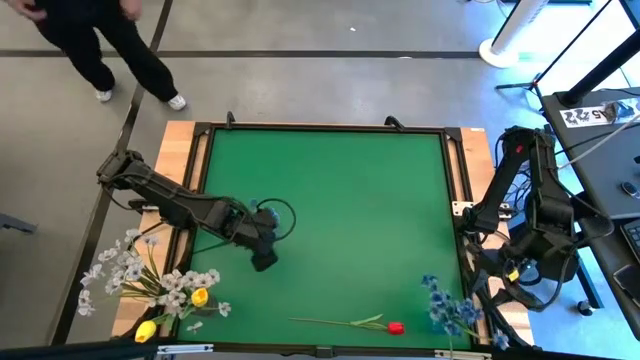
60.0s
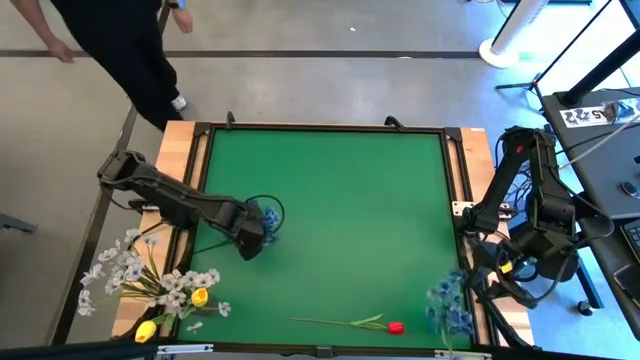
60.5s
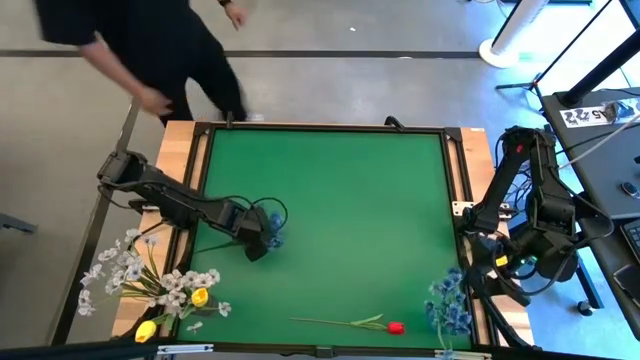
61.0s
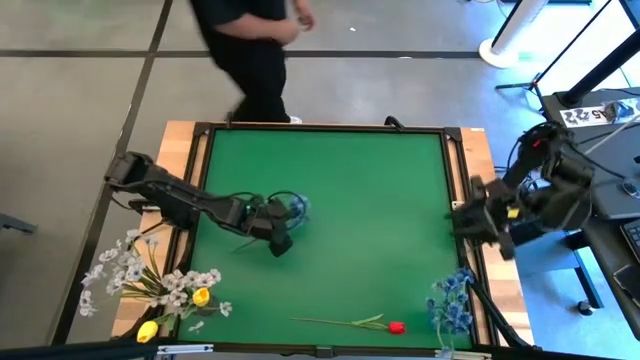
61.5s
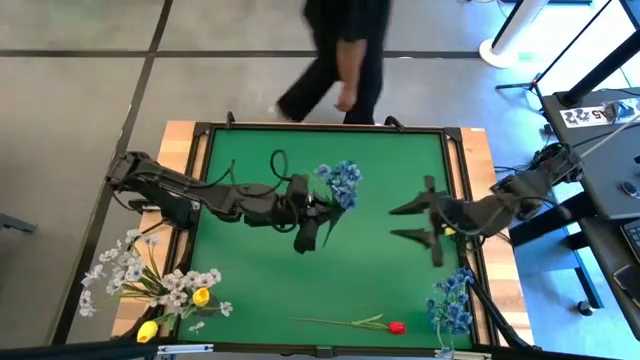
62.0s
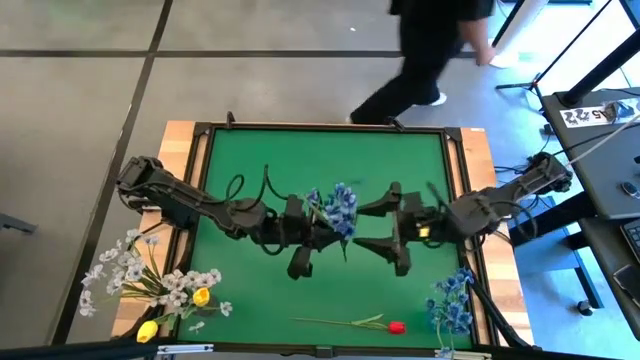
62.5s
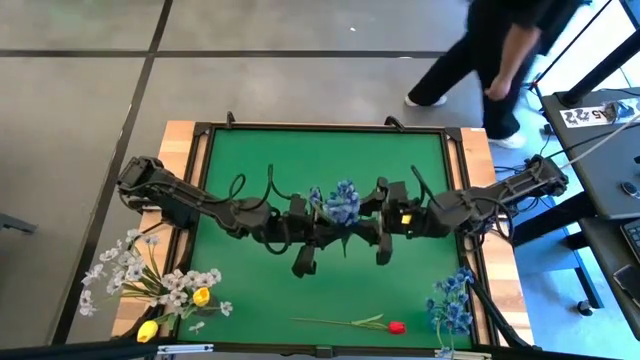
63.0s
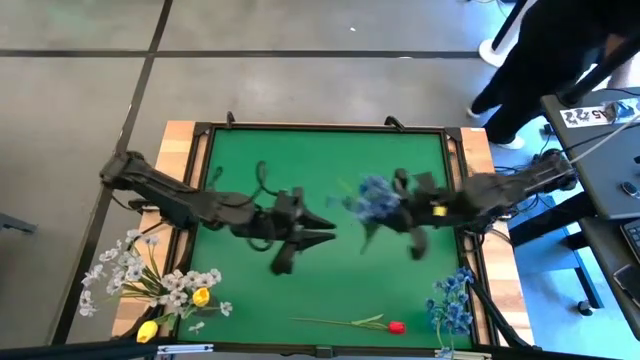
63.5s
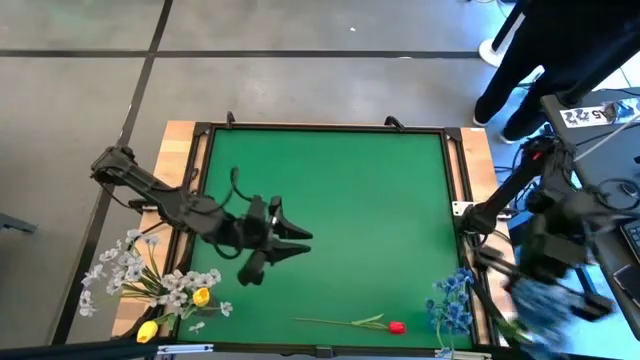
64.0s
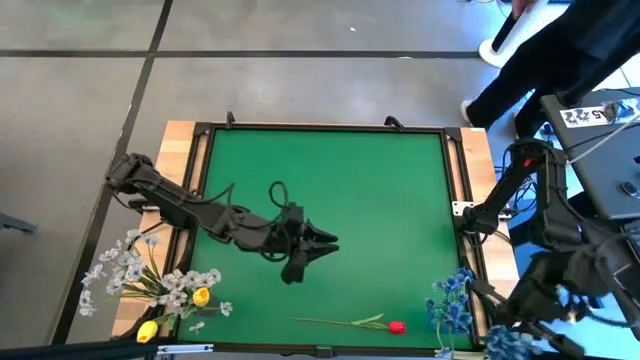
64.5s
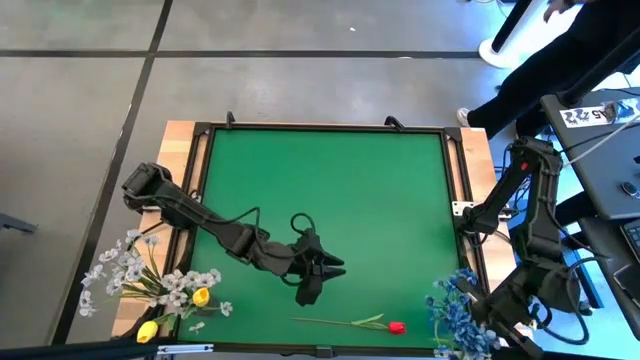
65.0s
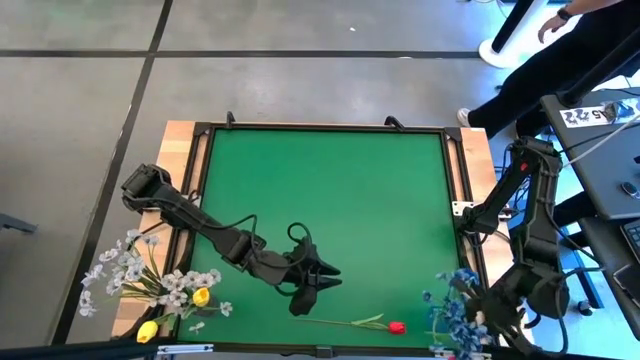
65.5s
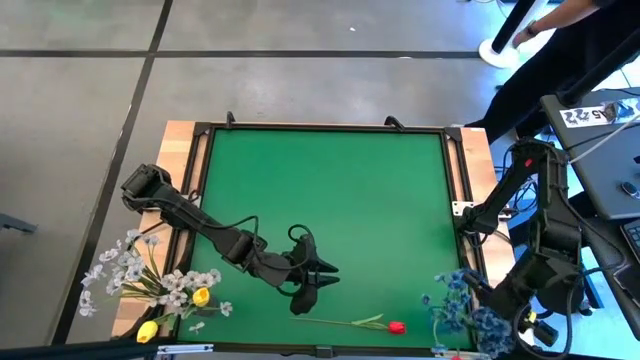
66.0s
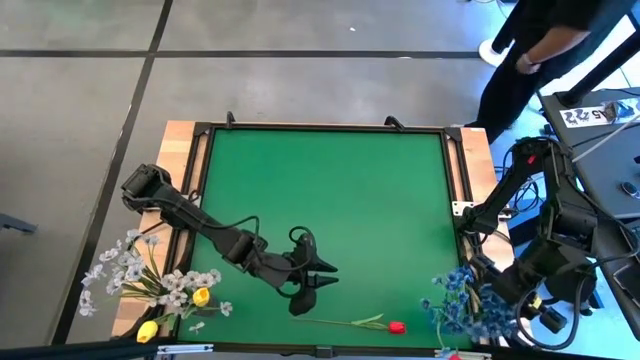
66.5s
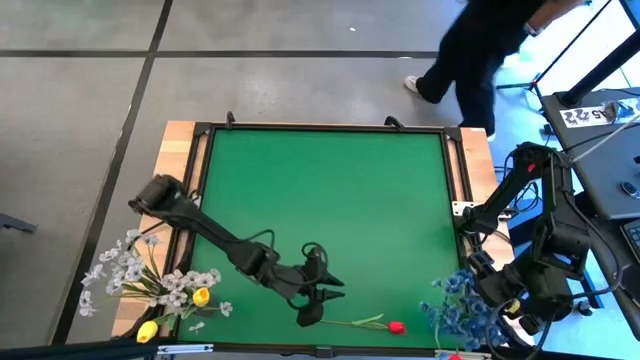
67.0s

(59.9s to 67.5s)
Task: Sort flowers into vase by color
Put the blue flowers into the blue vase

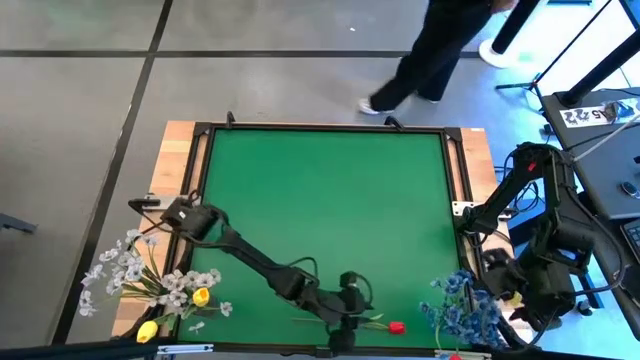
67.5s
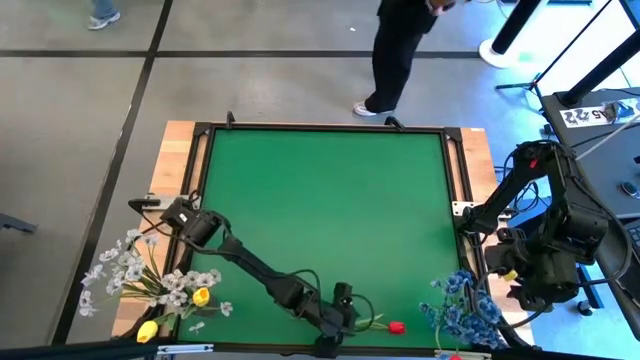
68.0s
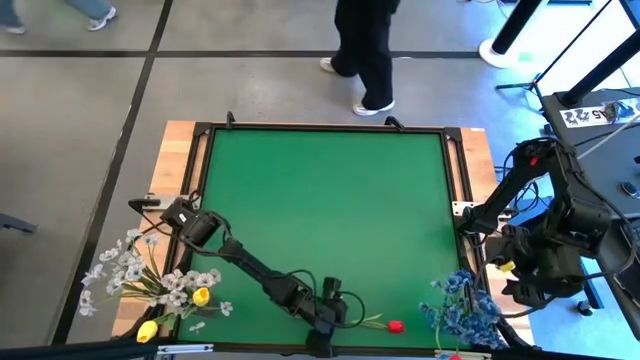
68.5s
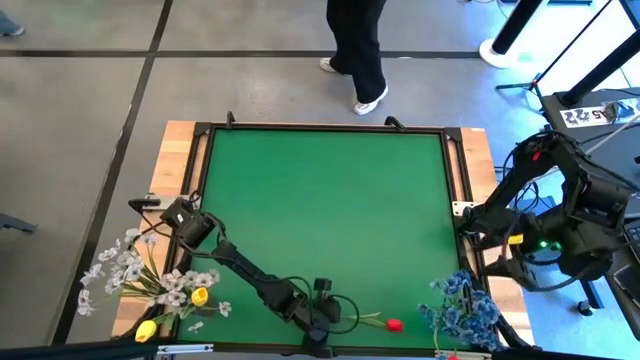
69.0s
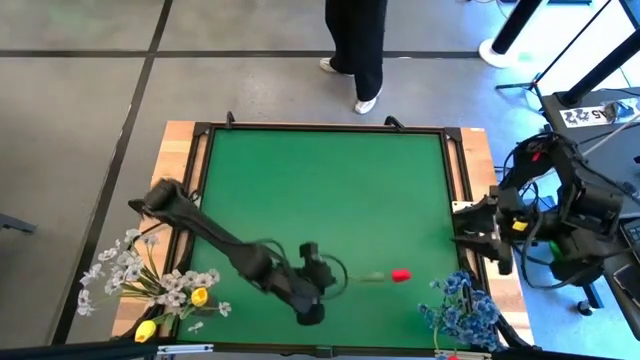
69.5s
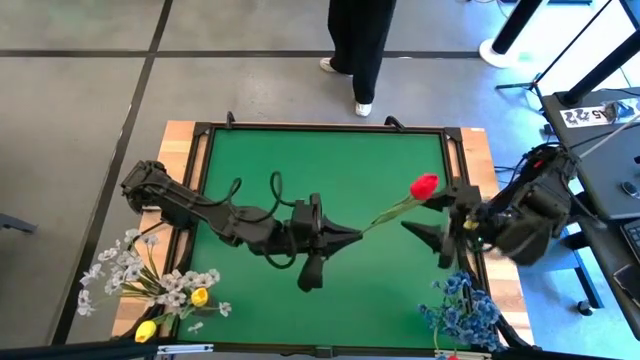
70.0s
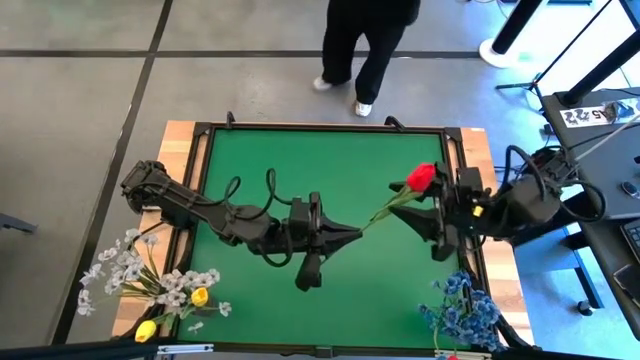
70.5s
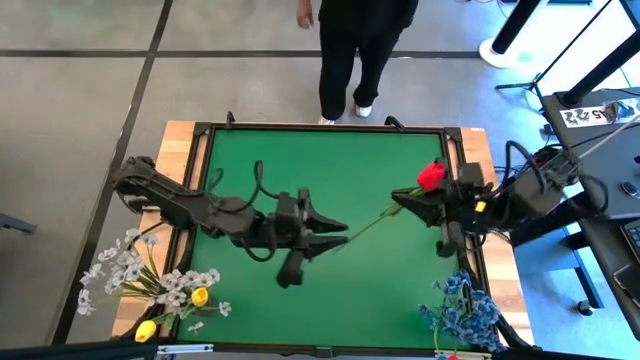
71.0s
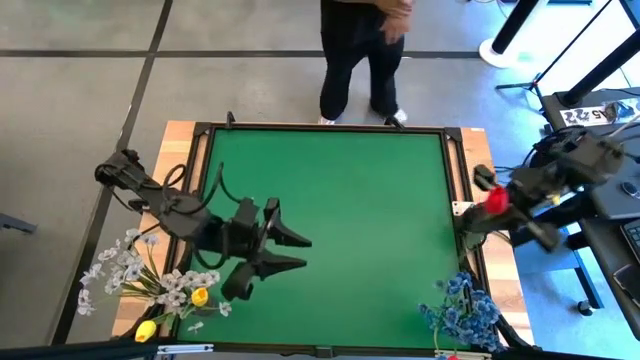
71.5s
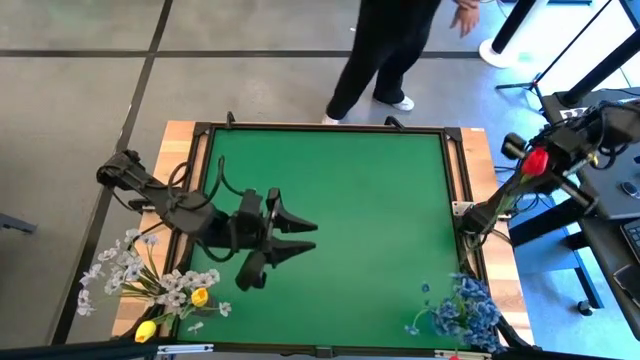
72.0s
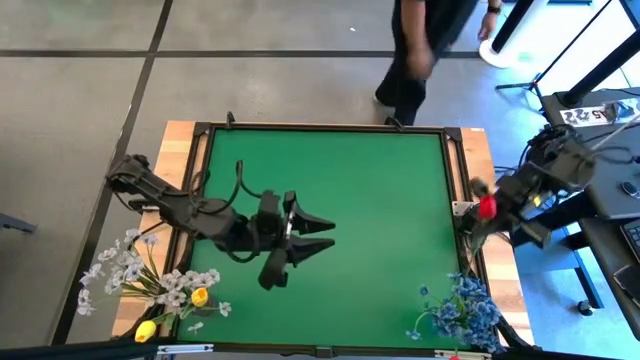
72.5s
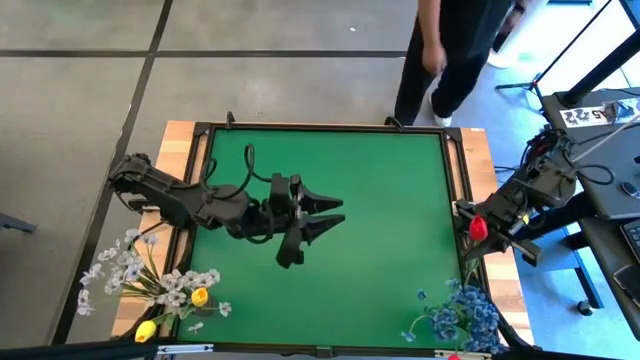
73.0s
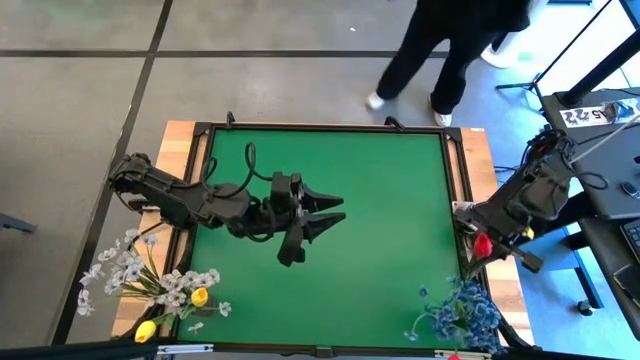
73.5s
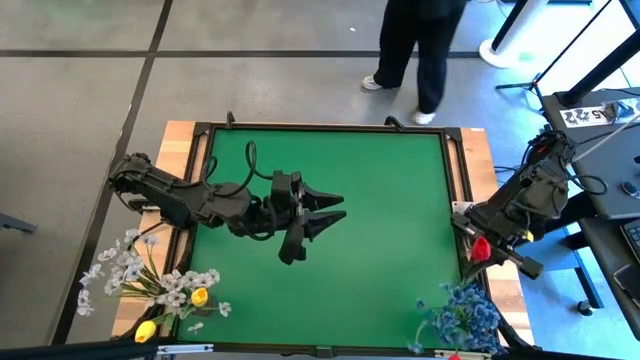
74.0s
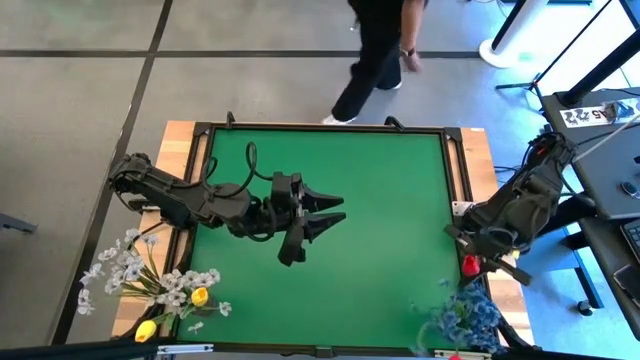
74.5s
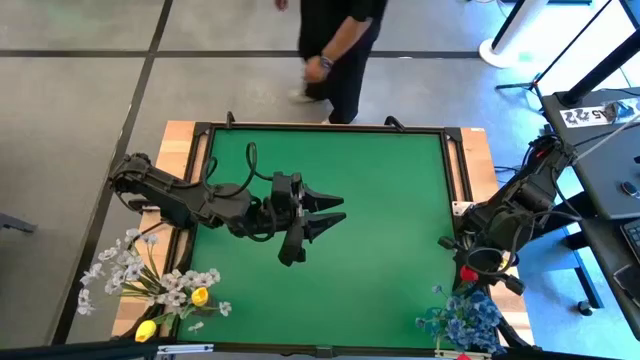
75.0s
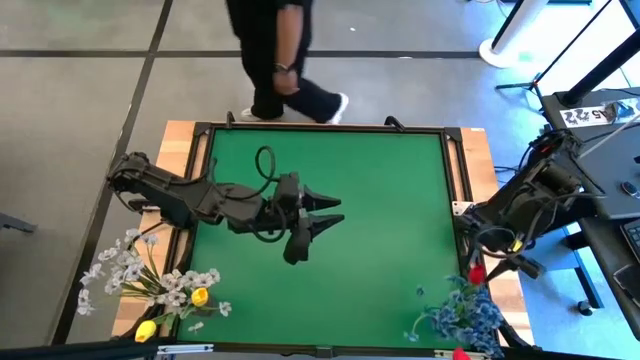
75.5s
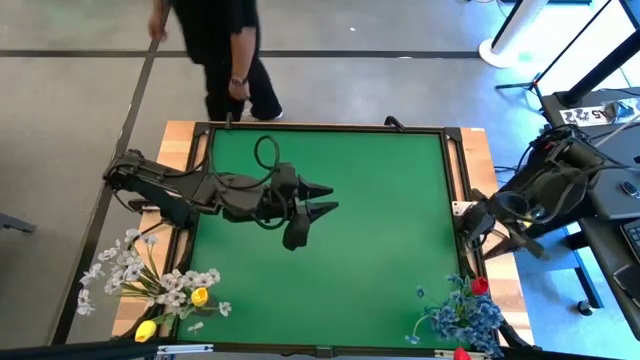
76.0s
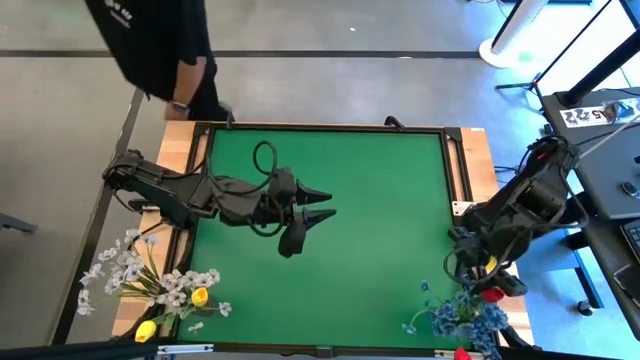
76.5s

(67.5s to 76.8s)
Put the red tulip into the blue vase

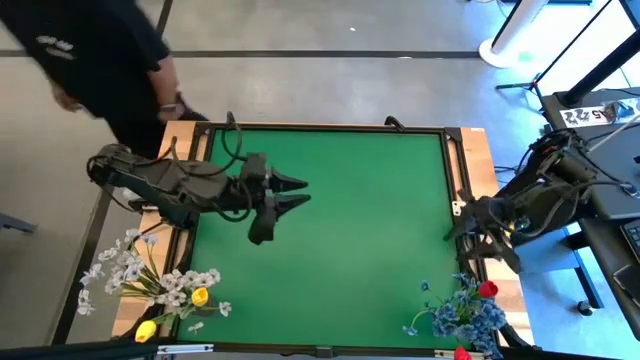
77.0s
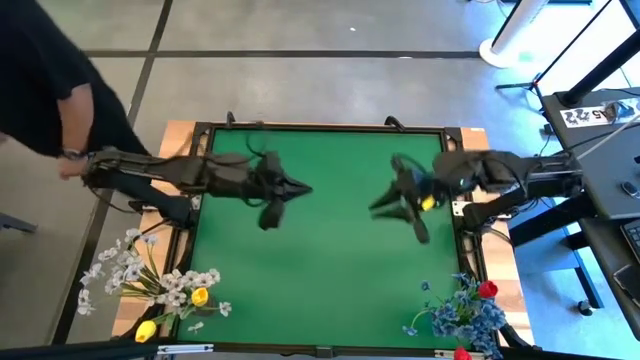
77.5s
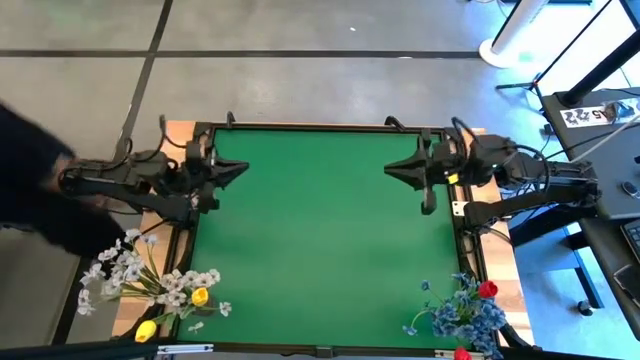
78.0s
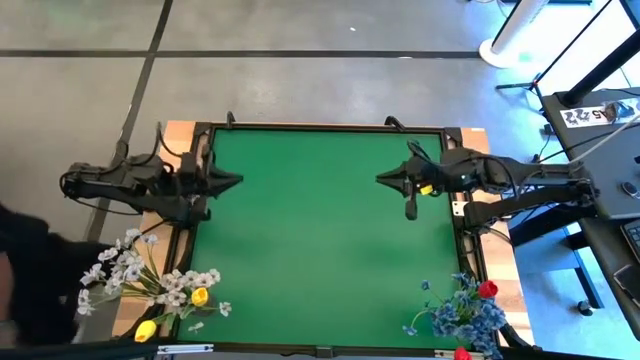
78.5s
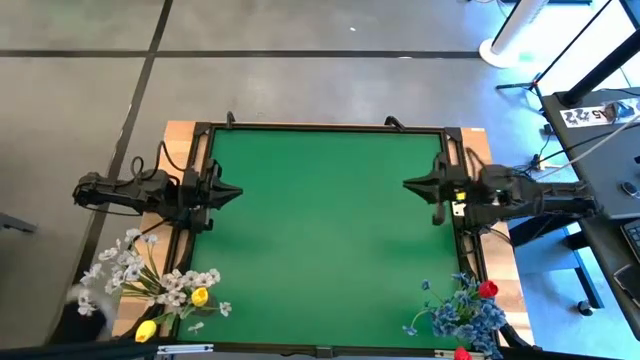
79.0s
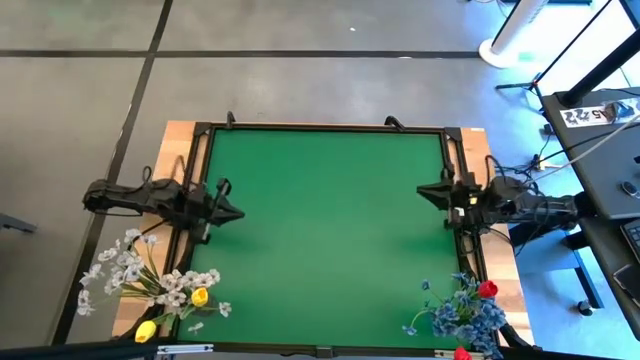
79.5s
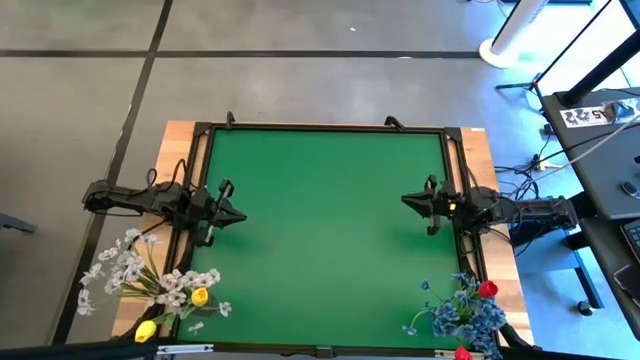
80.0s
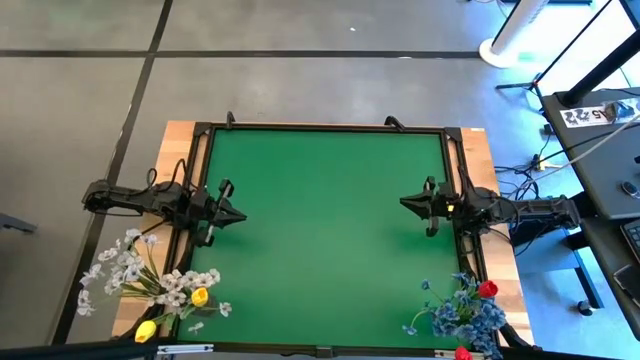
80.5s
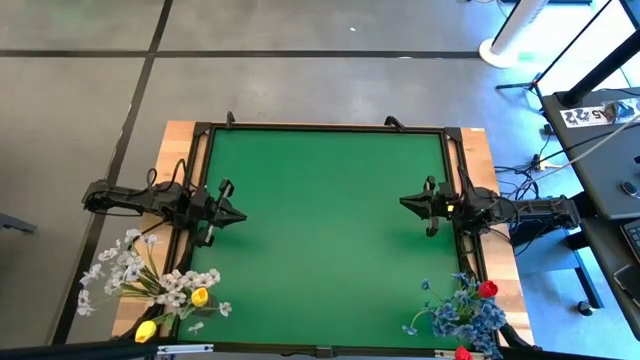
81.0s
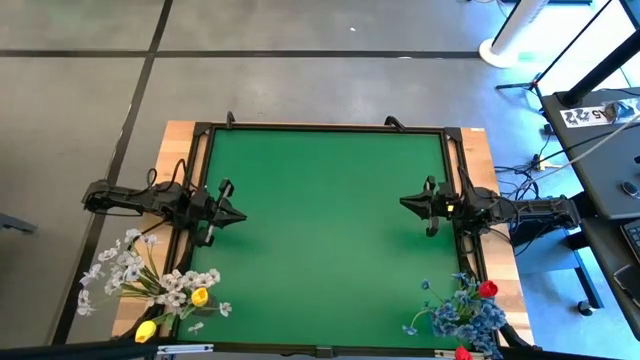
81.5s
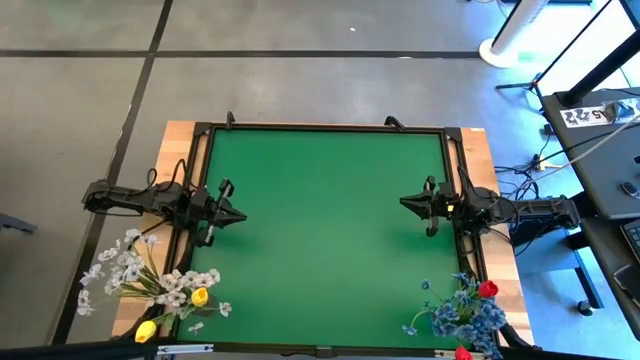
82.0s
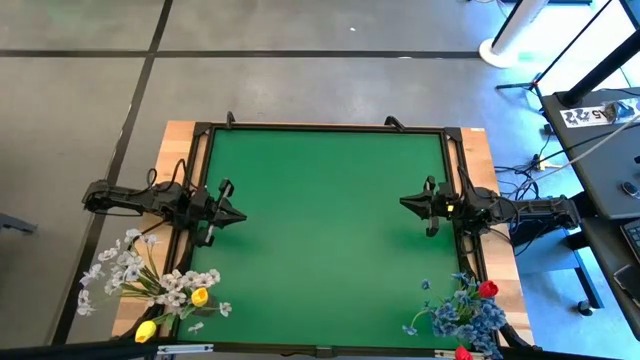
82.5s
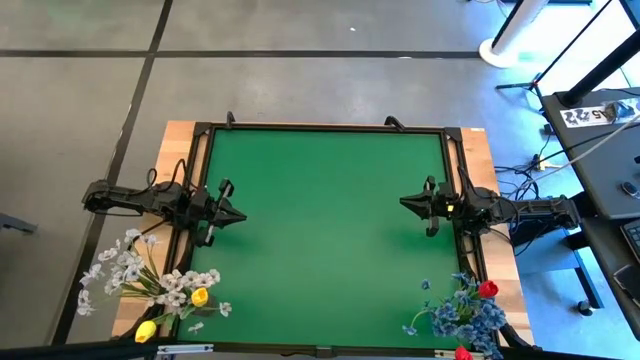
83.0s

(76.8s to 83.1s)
Return to Home Position
